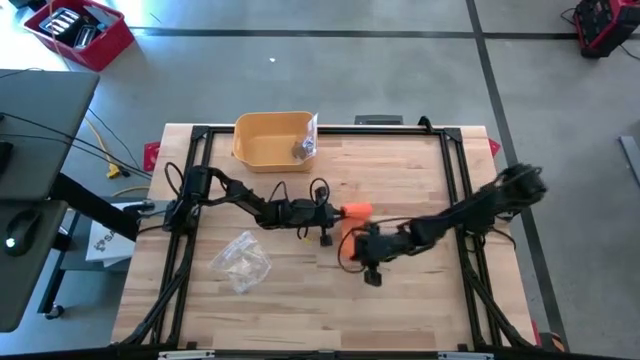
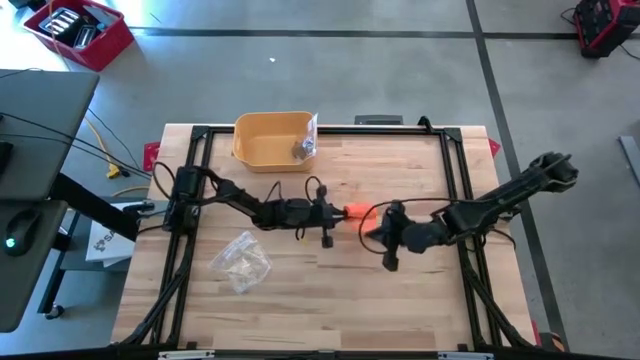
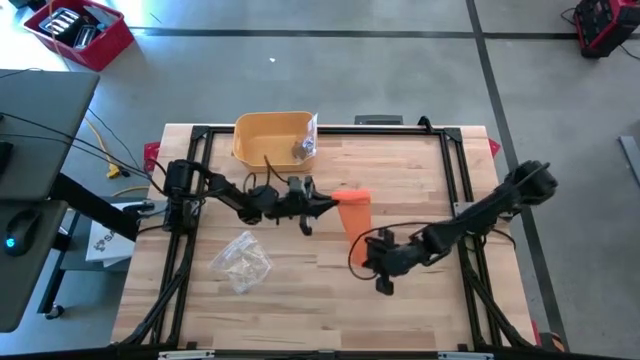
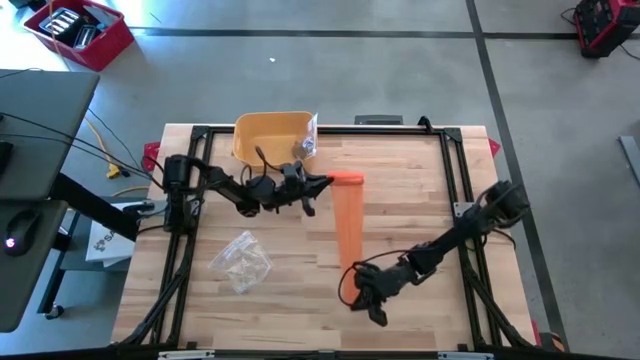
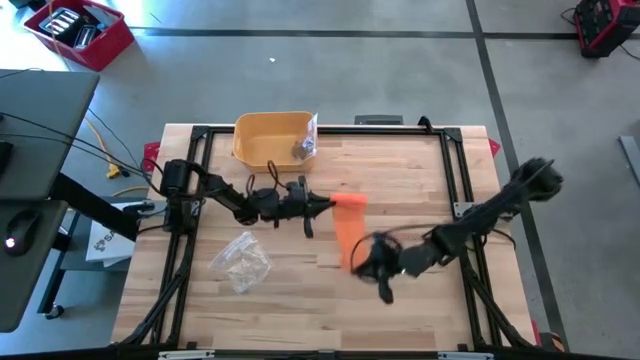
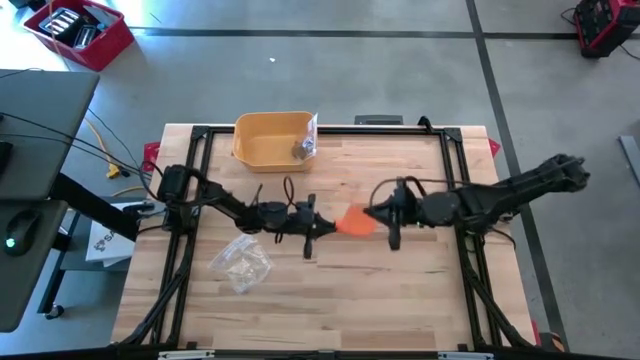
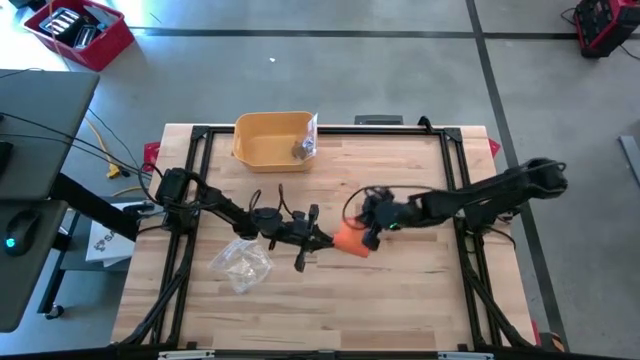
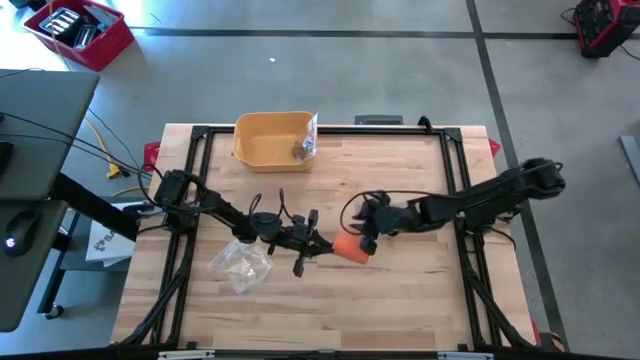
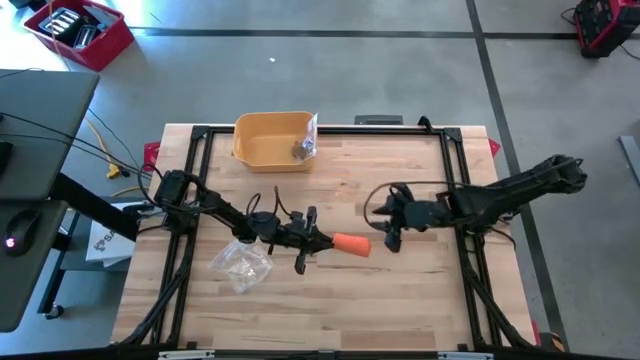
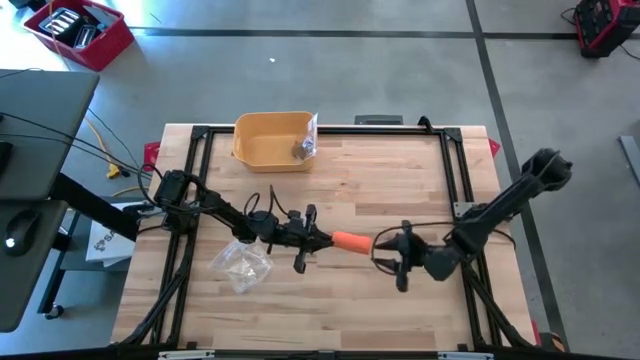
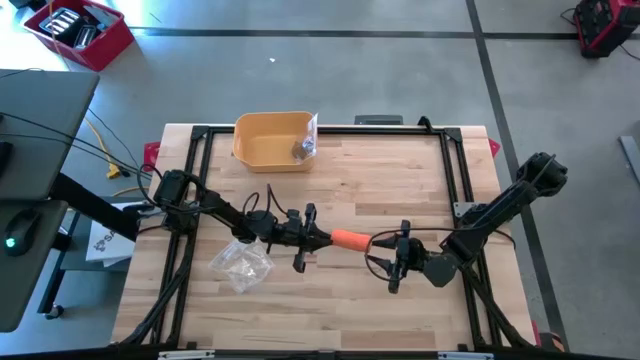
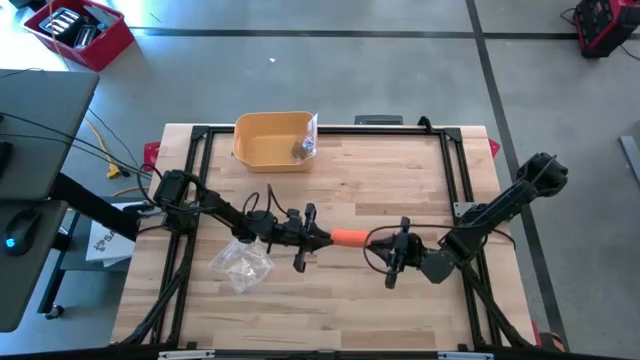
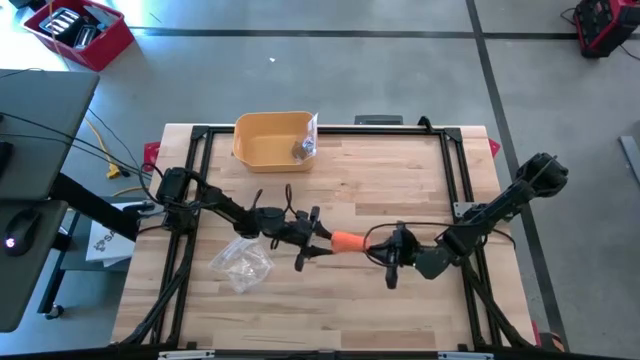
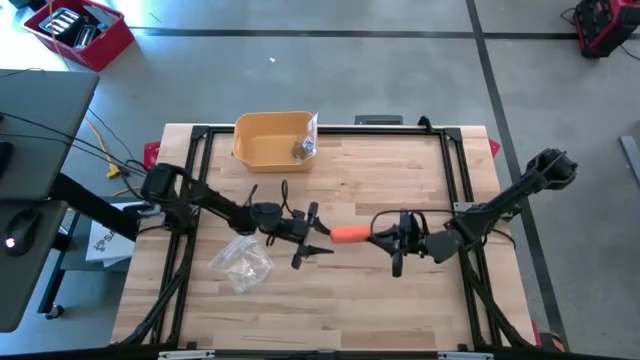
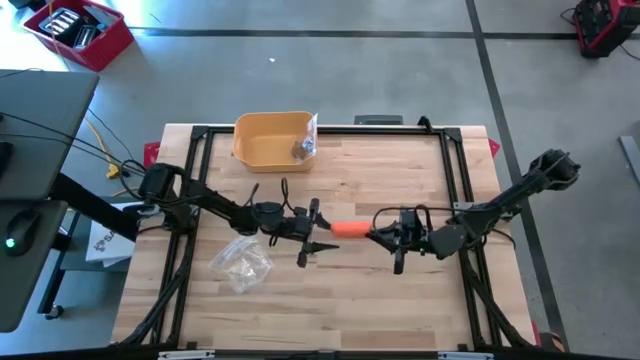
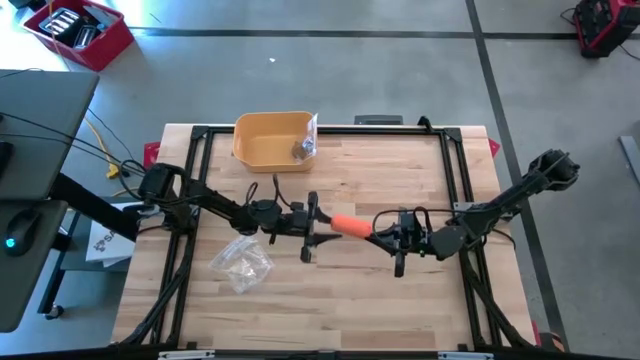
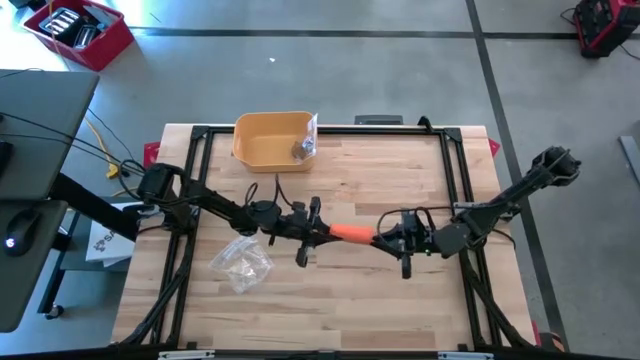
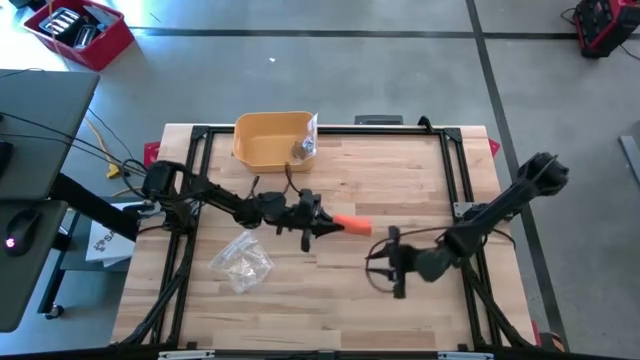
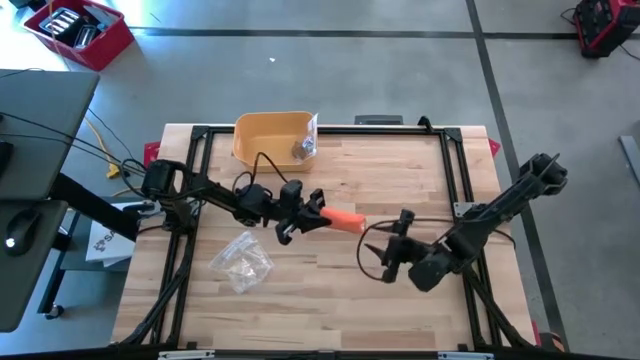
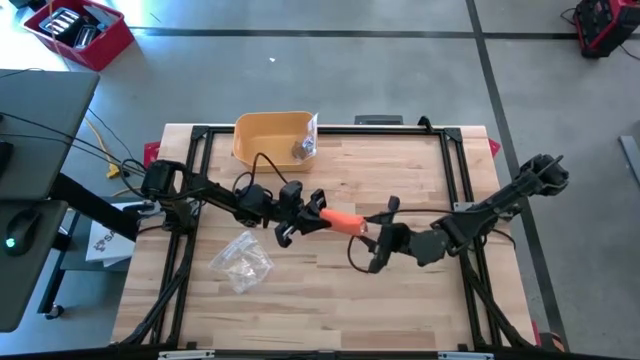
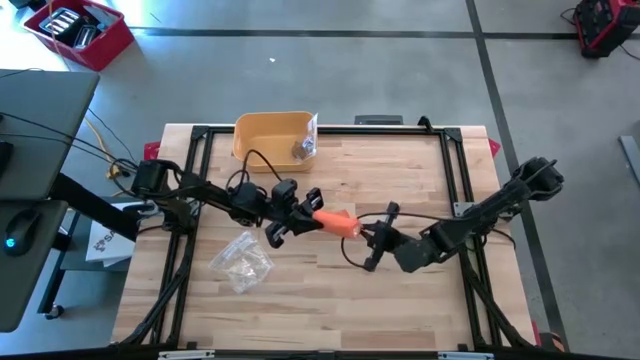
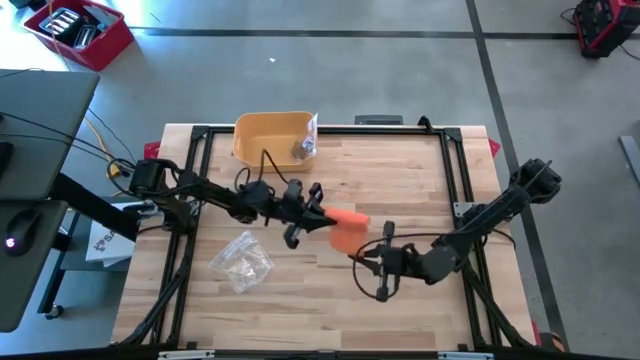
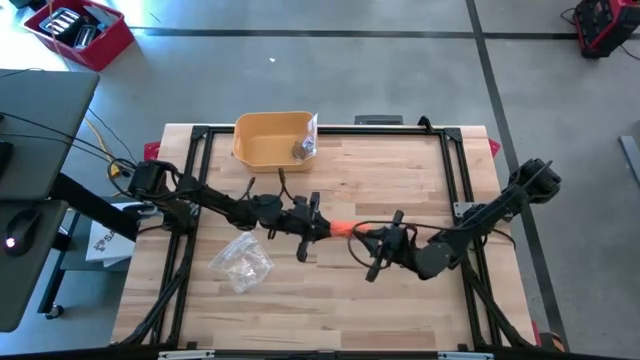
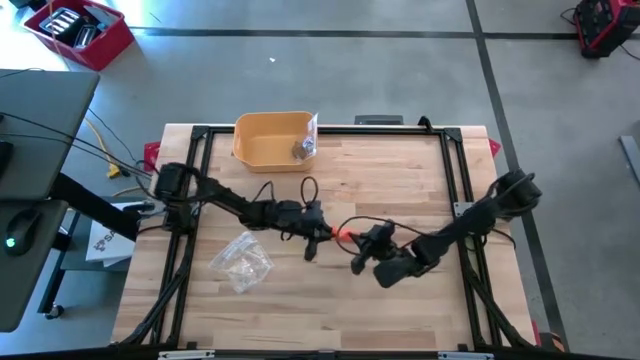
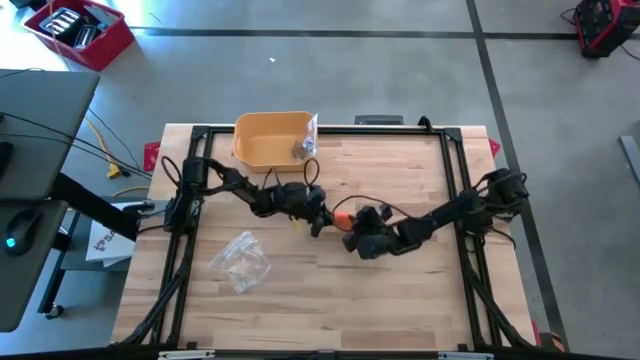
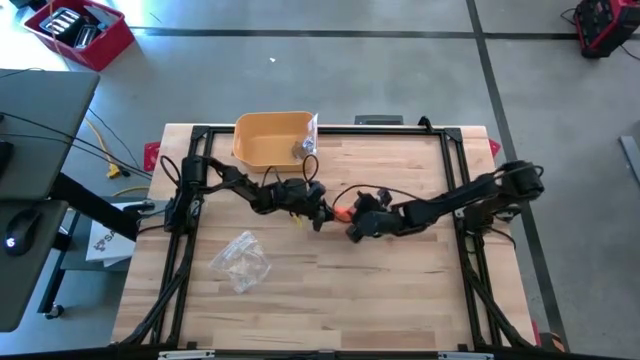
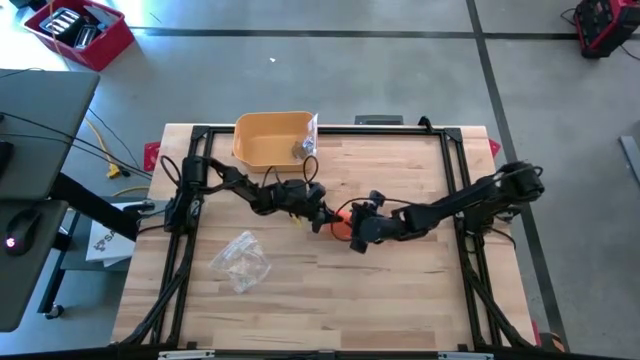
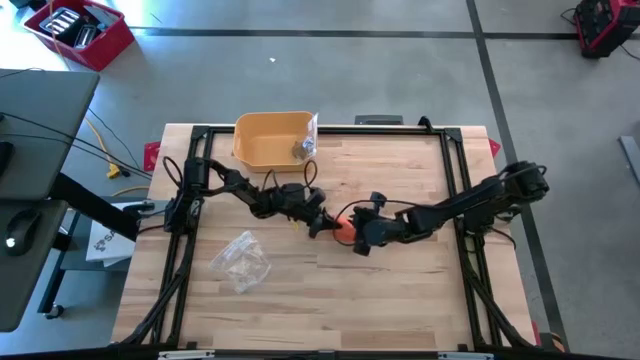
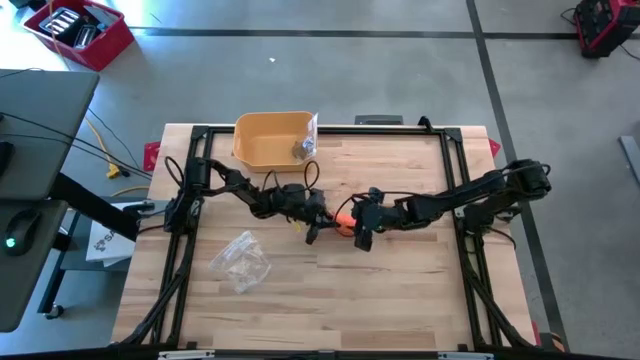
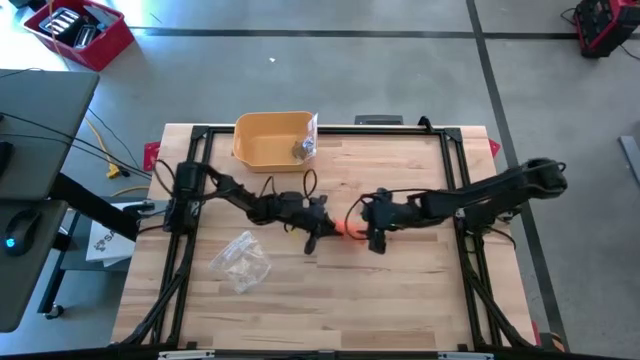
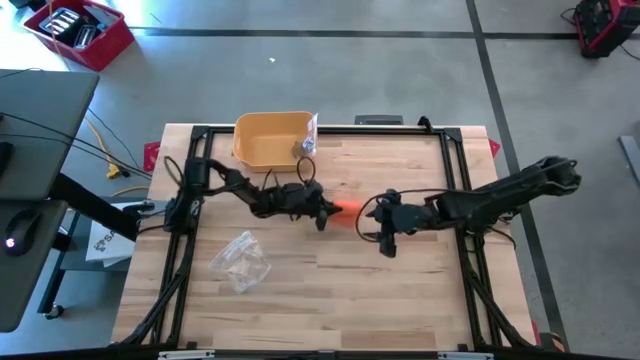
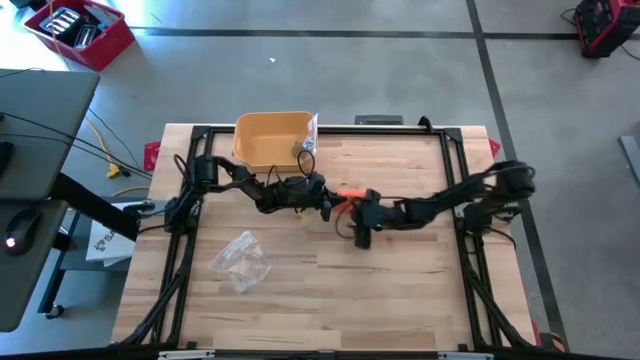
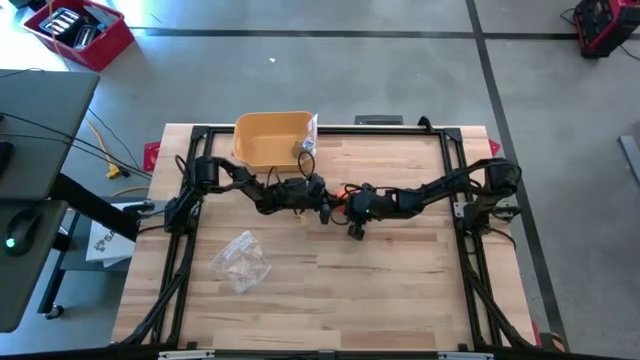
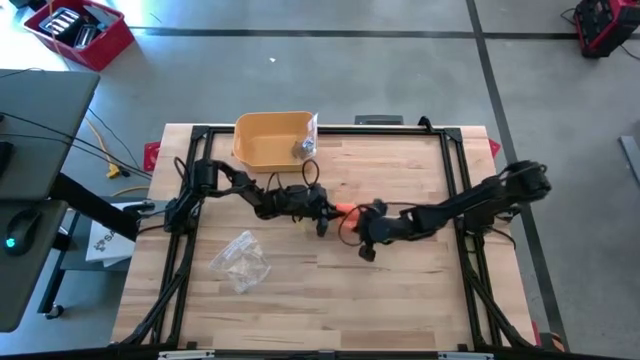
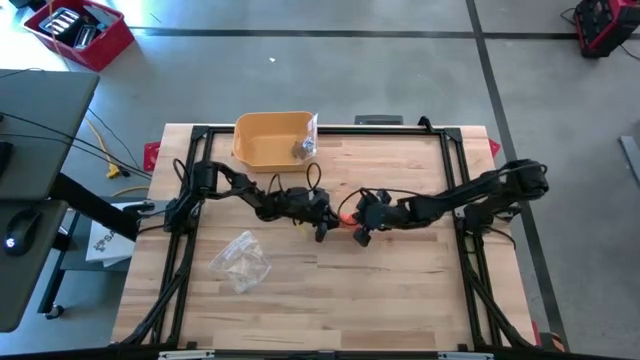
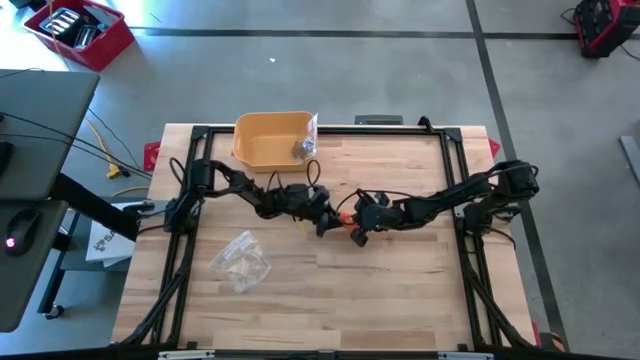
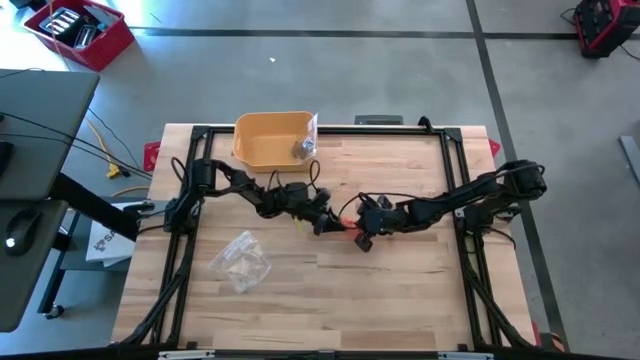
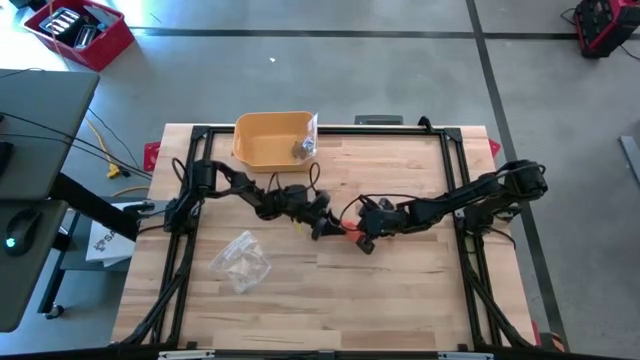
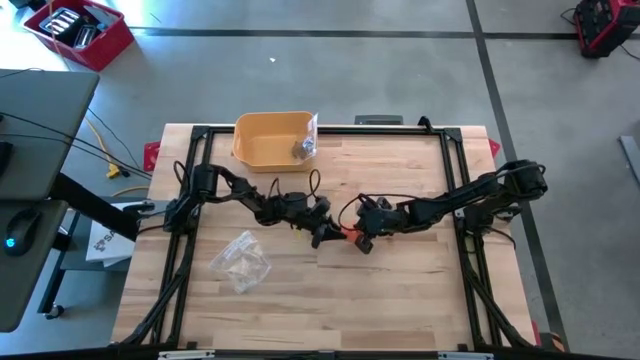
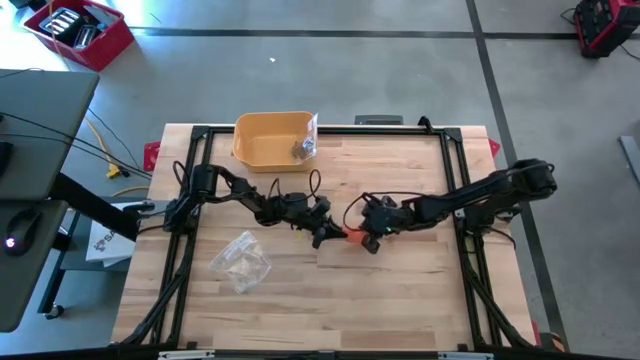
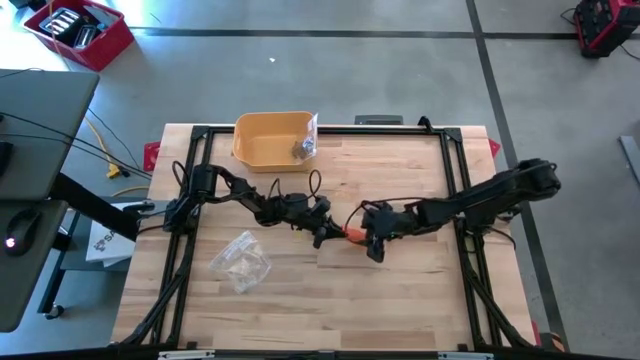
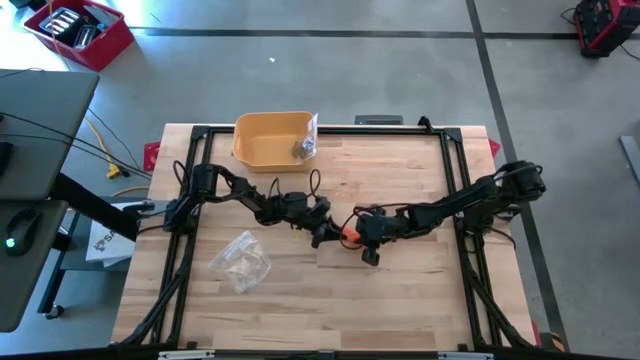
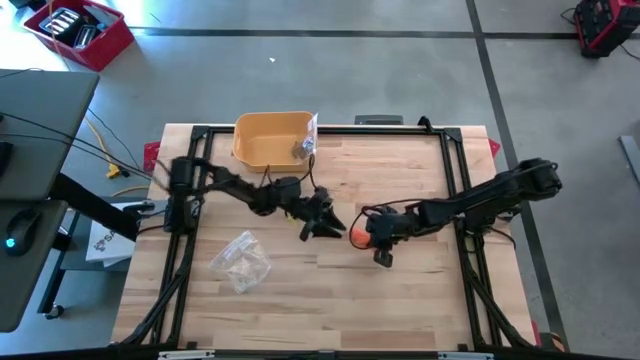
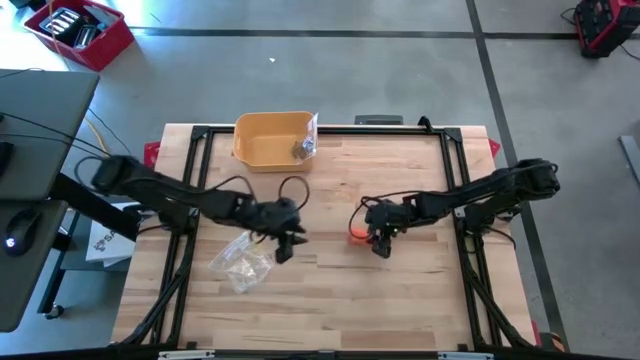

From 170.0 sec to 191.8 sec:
Task: Roll bandage
Roll the orange bandage
